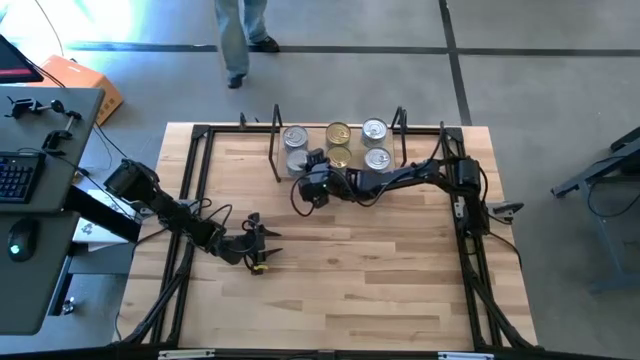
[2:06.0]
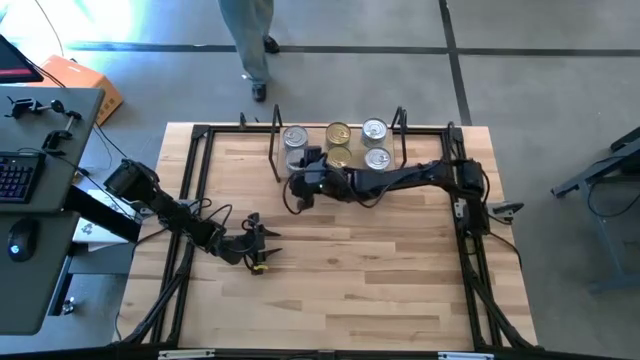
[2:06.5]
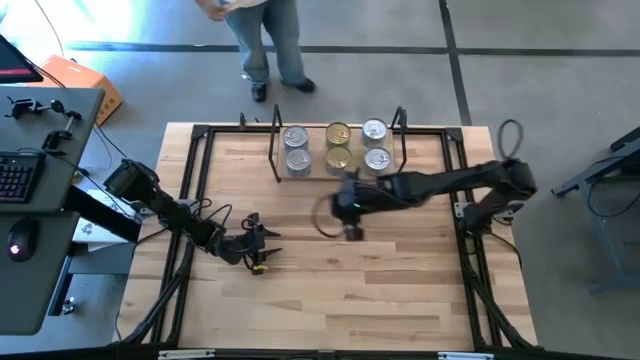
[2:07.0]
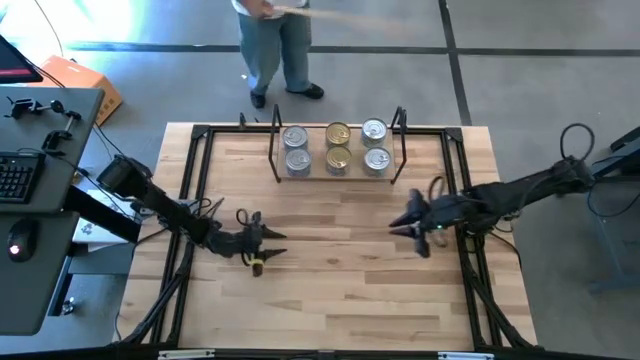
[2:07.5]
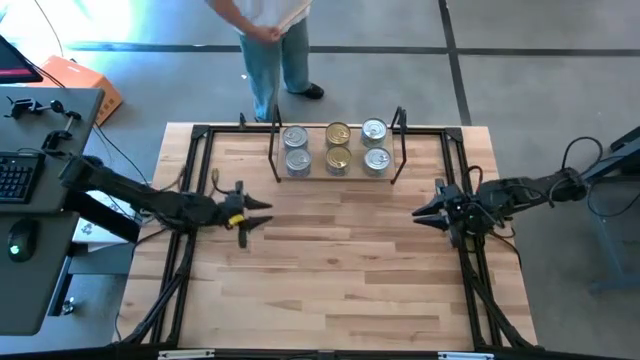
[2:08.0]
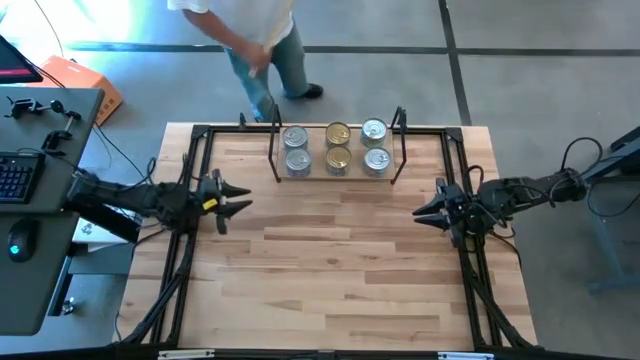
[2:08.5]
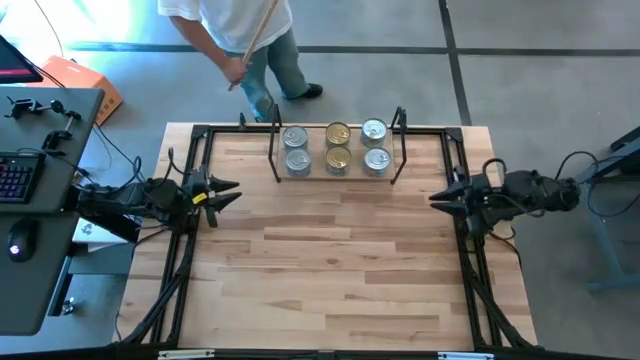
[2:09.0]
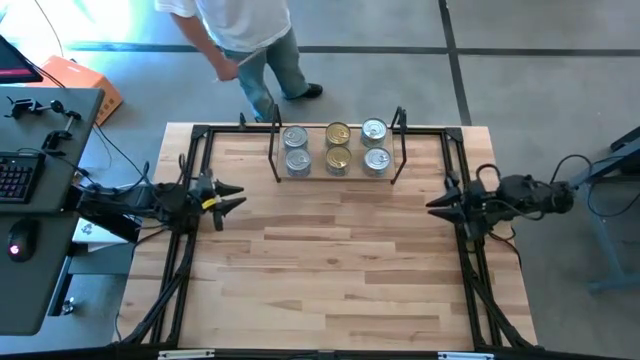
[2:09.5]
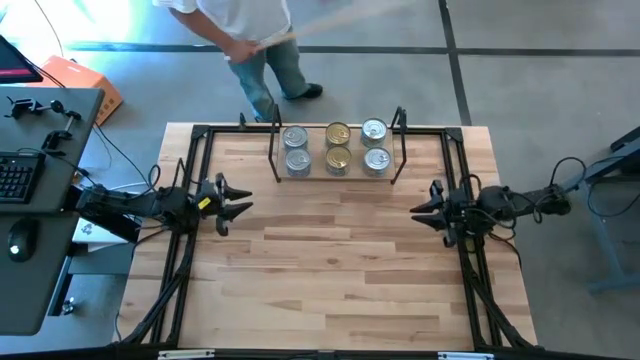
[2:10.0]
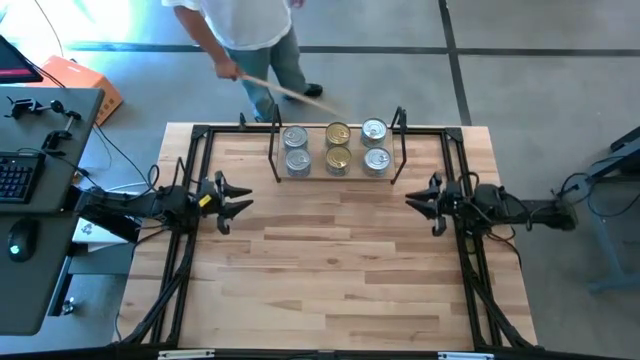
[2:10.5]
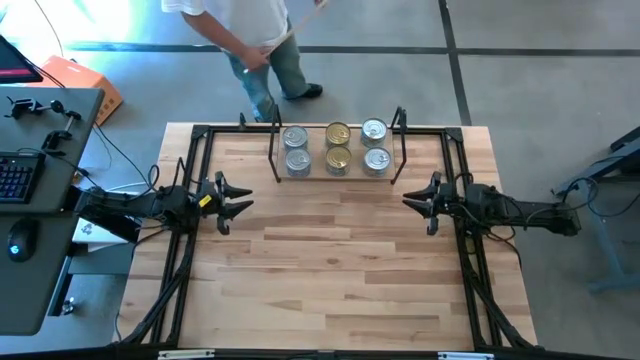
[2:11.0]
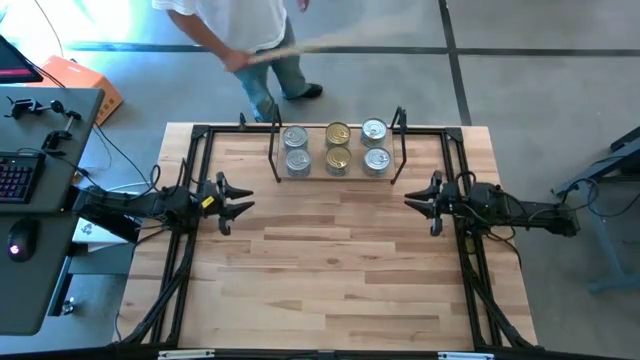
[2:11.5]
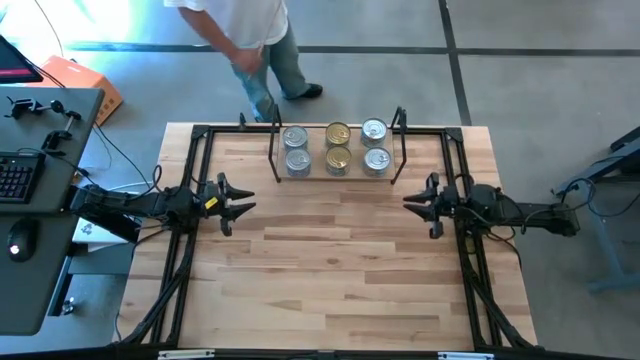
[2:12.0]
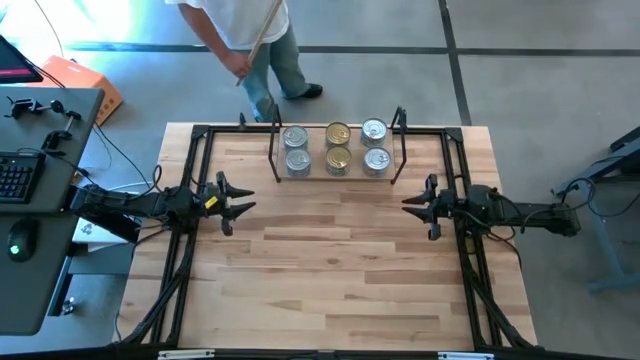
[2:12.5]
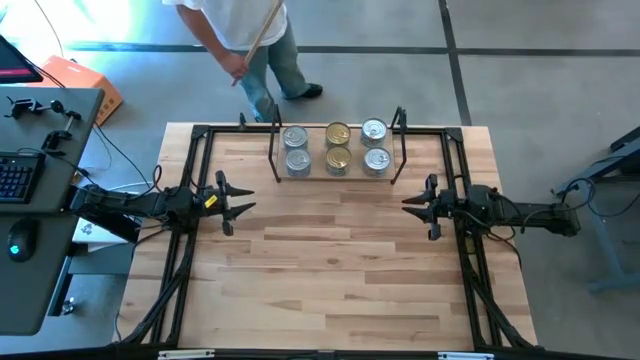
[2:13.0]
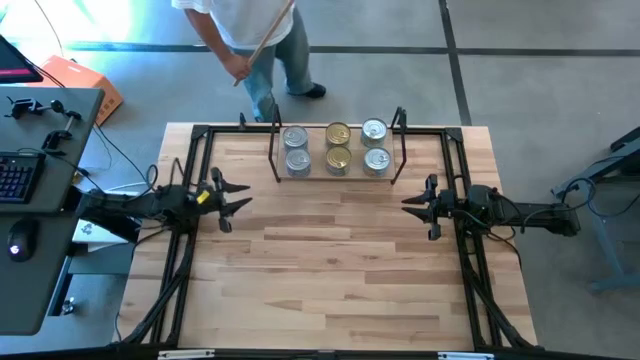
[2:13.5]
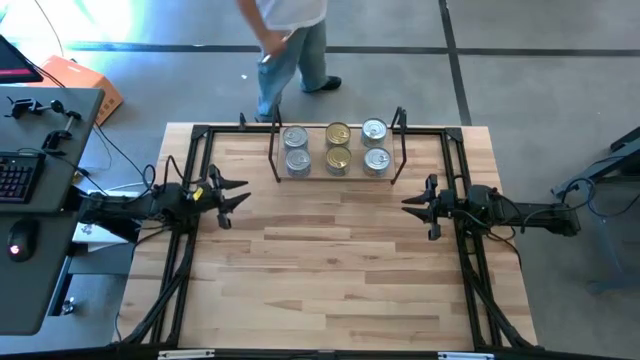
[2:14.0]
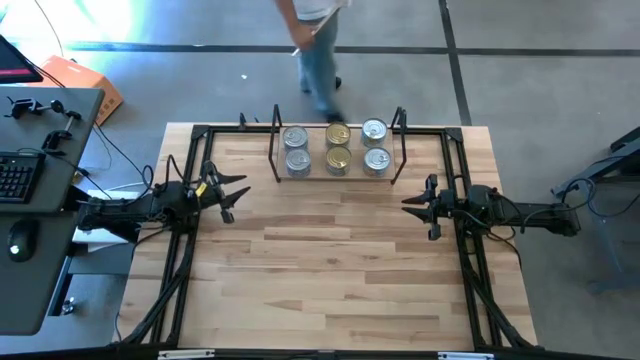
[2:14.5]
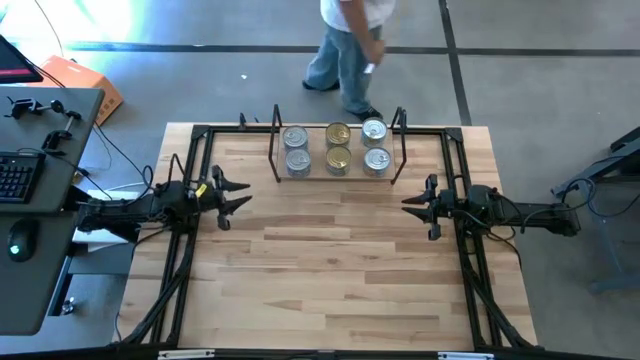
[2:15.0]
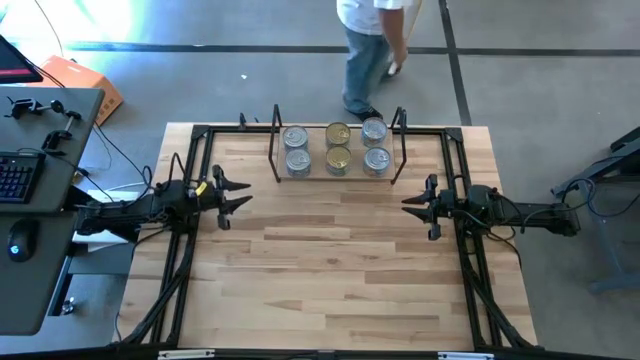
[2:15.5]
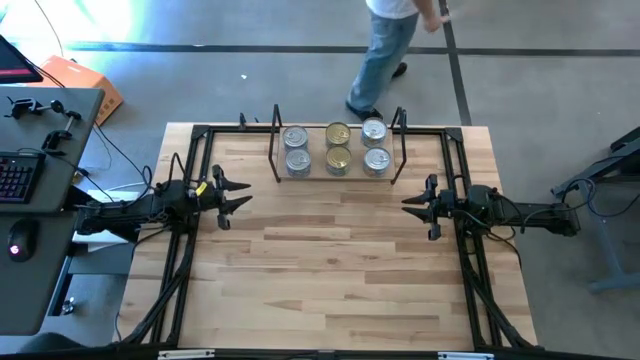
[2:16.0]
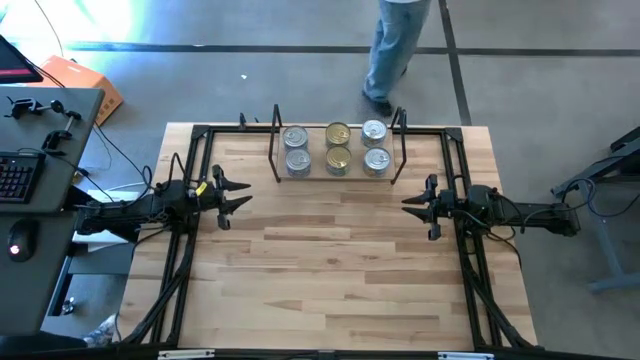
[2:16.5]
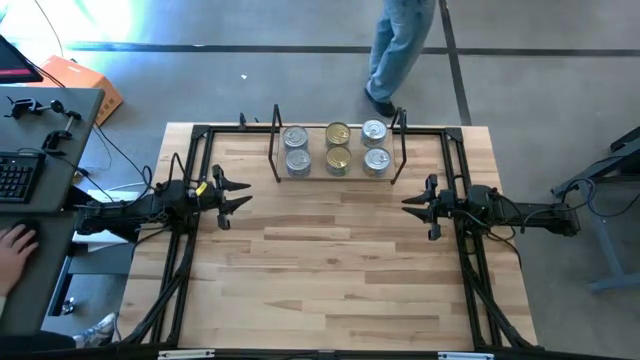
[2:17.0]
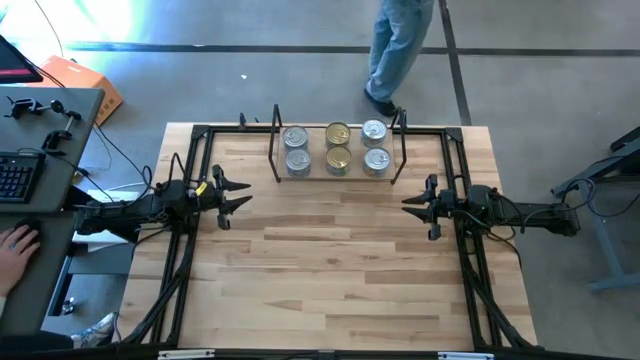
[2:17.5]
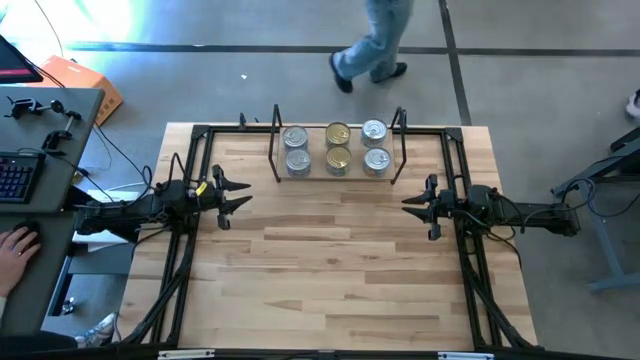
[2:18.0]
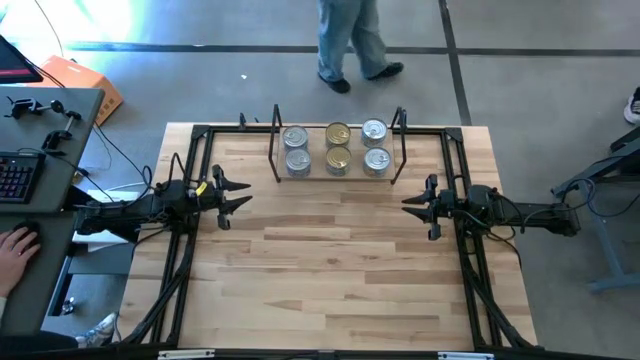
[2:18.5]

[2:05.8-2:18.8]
Task: Stack canned seafood by type on shelf
Return to Home Position

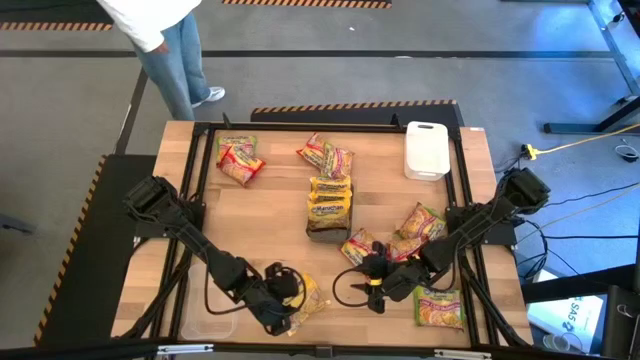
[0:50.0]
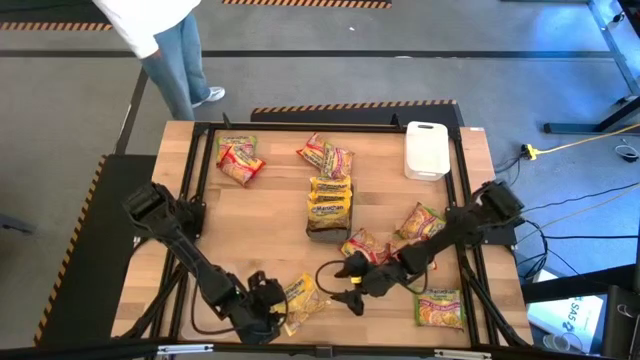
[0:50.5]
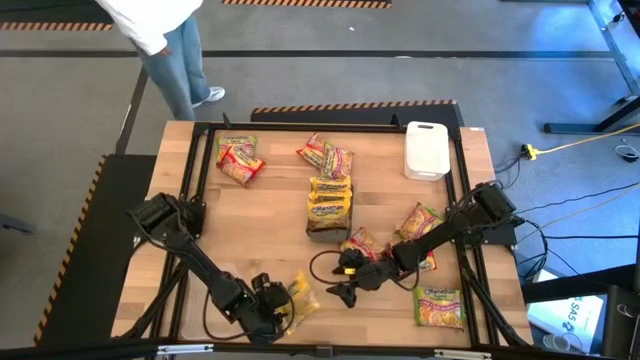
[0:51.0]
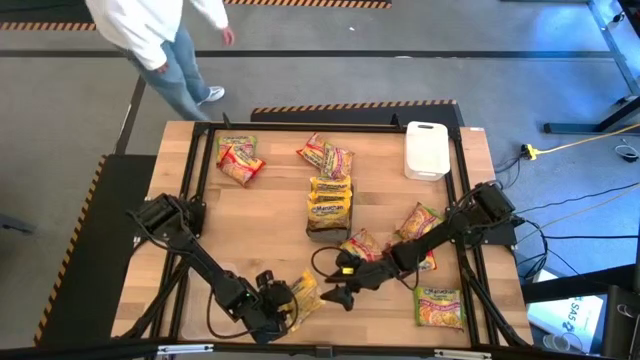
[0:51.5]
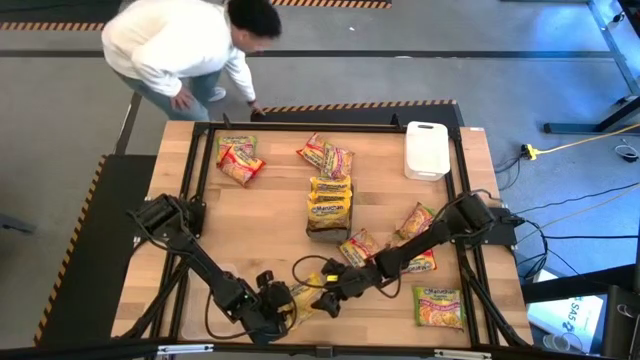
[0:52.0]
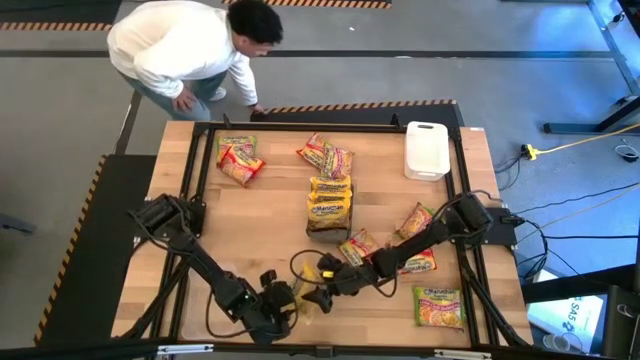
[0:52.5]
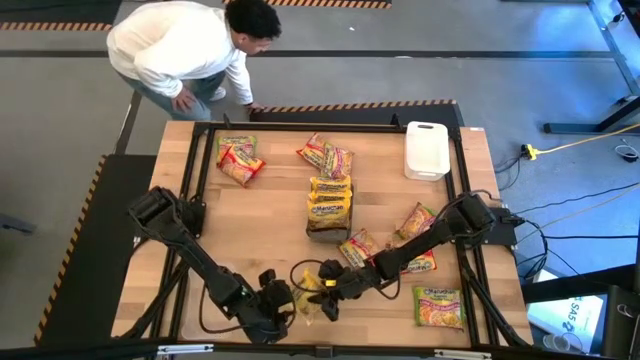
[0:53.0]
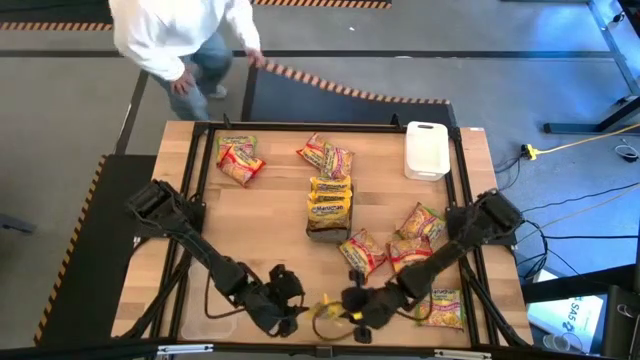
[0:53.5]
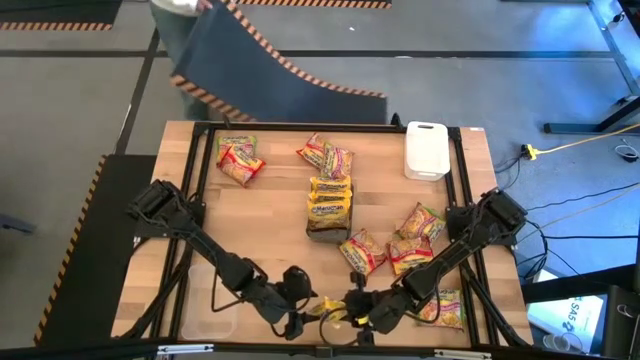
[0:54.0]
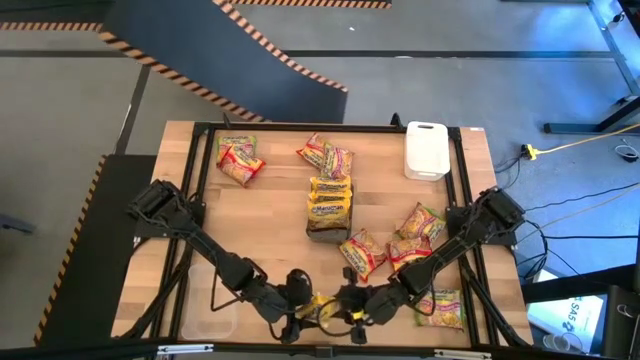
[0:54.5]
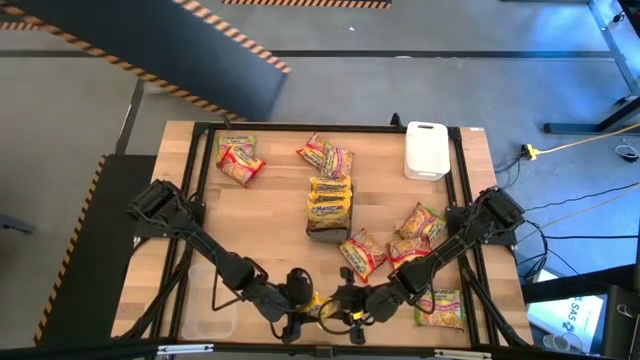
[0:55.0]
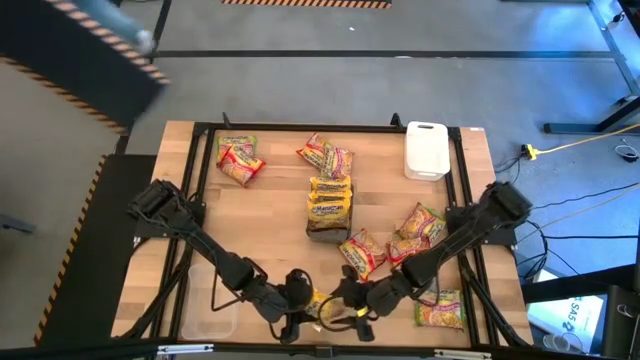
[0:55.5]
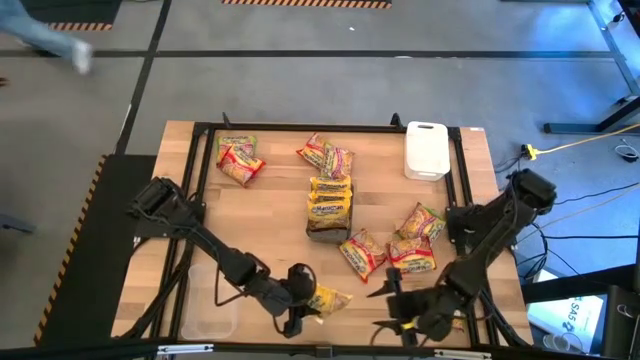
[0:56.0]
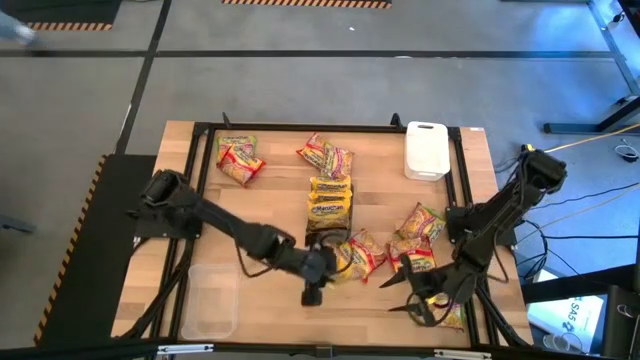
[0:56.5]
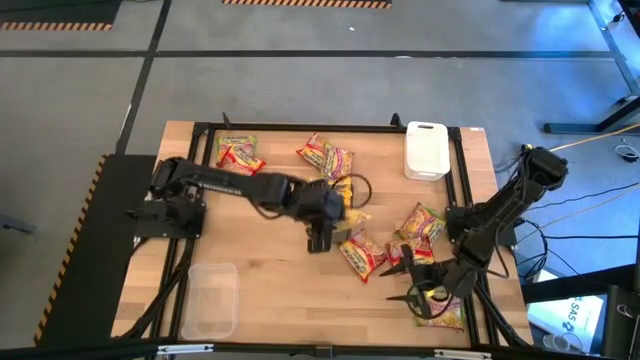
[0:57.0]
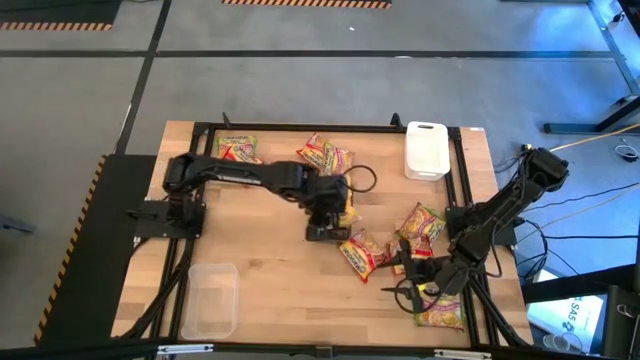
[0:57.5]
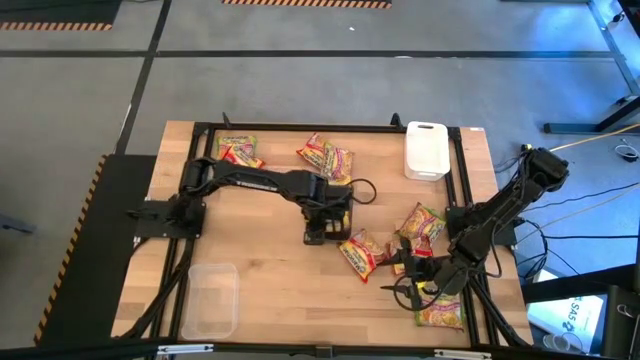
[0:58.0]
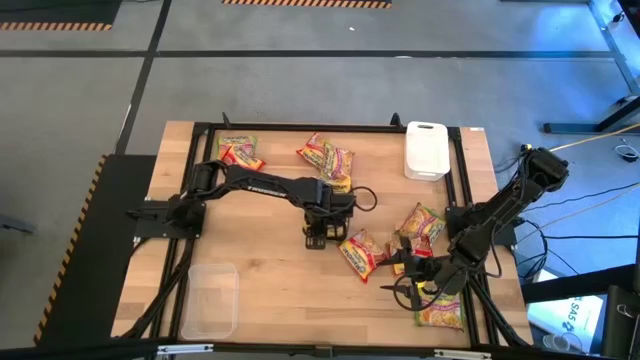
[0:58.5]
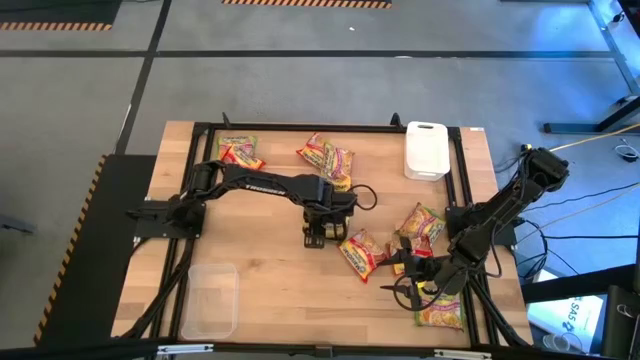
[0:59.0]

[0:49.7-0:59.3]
Task: Sort Maruchan noodles
Put the yellow noodle pack into the black bin

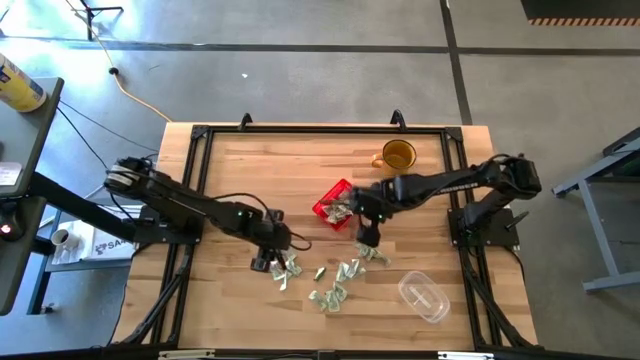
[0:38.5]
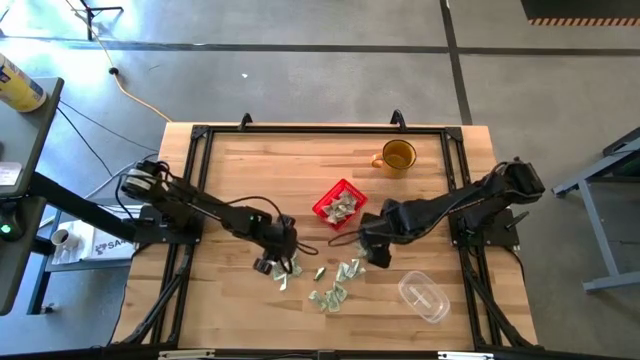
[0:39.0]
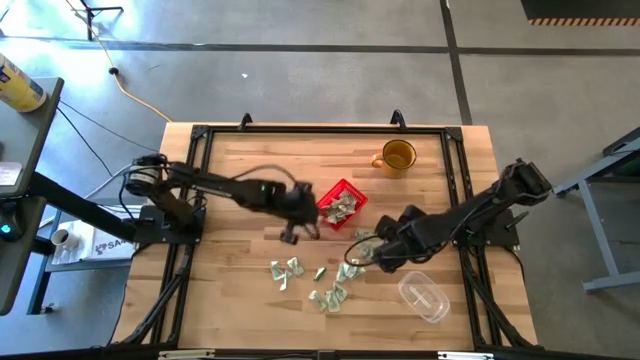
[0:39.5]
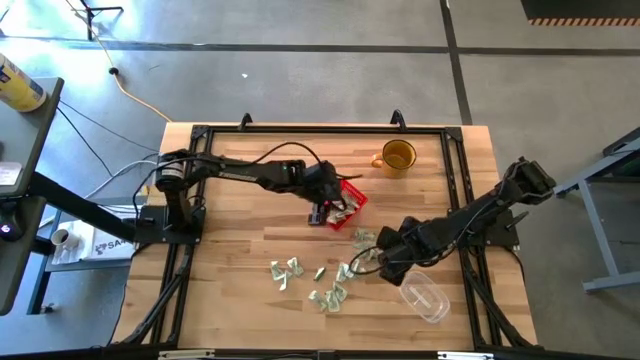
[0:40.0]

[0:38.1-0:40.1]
Task: Pick and place items into bin
Put the white stevia packet into the red bin
